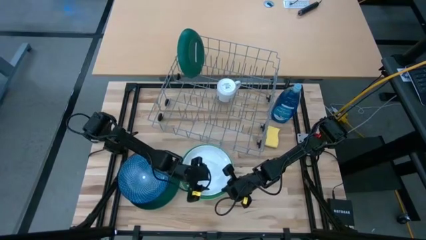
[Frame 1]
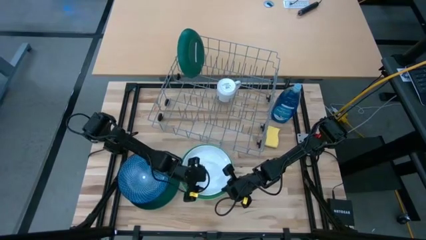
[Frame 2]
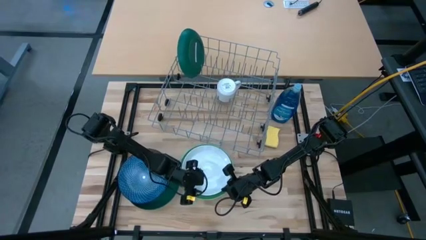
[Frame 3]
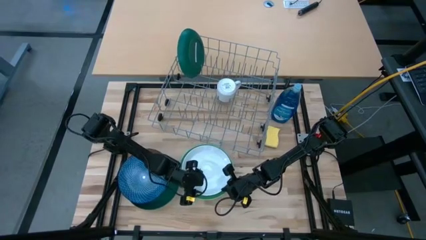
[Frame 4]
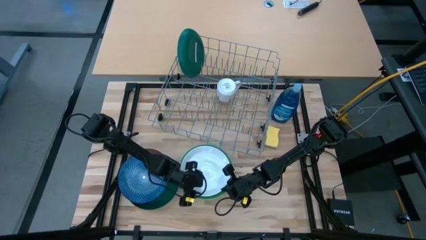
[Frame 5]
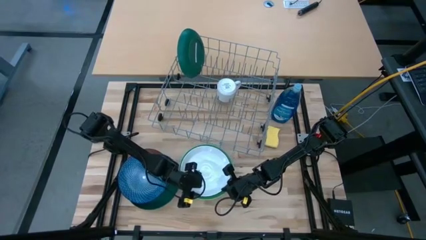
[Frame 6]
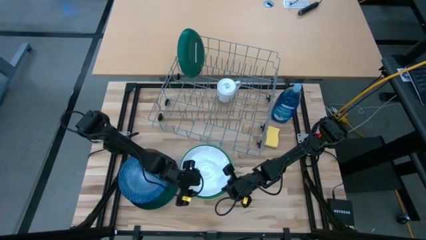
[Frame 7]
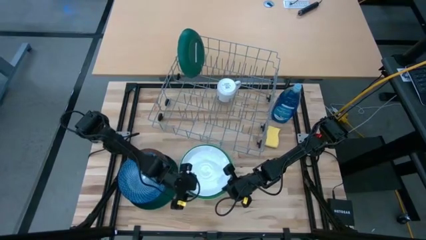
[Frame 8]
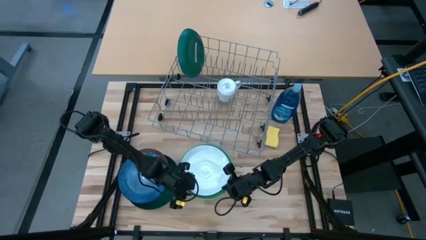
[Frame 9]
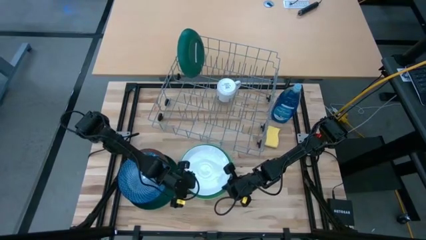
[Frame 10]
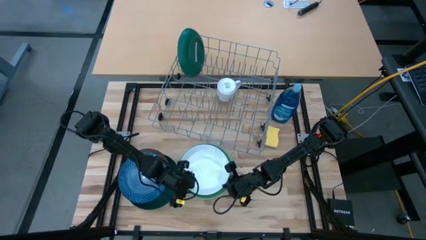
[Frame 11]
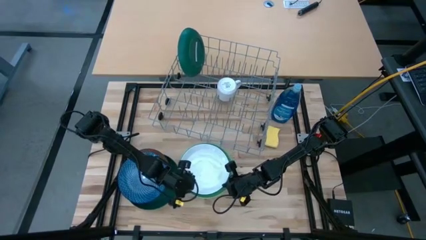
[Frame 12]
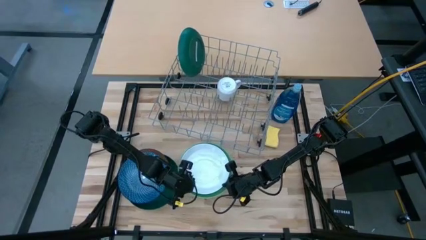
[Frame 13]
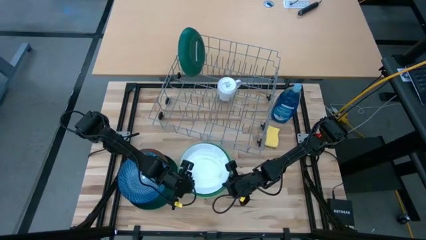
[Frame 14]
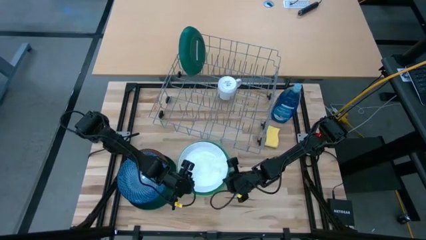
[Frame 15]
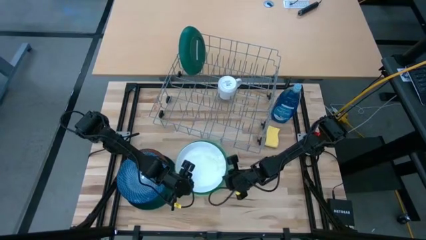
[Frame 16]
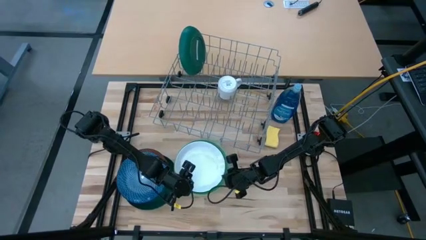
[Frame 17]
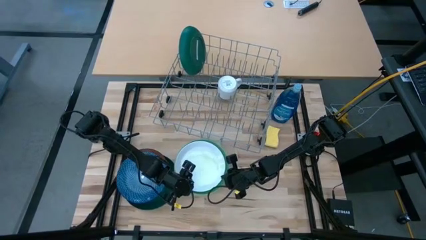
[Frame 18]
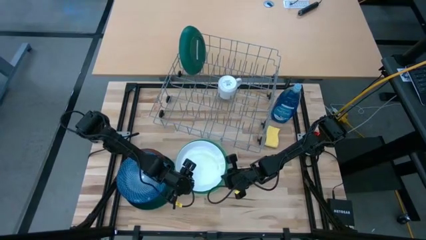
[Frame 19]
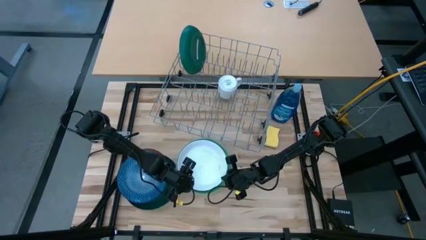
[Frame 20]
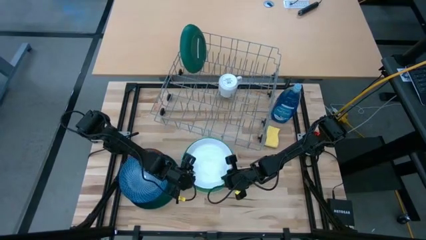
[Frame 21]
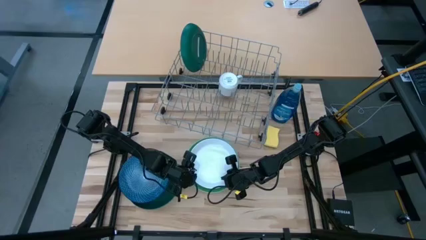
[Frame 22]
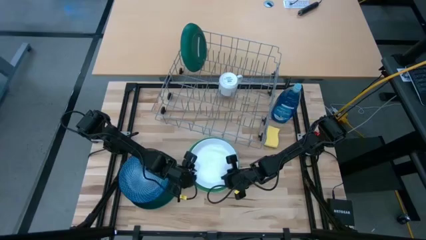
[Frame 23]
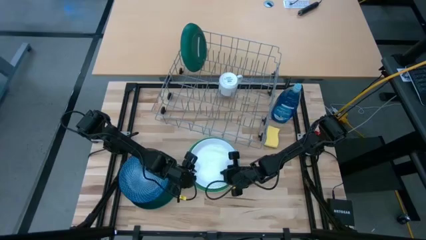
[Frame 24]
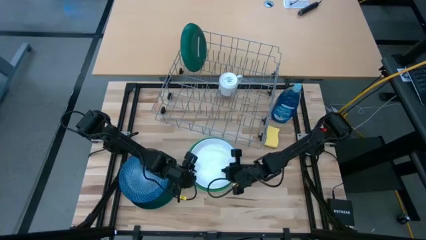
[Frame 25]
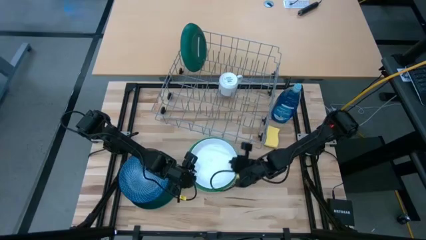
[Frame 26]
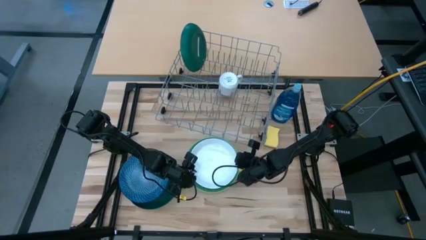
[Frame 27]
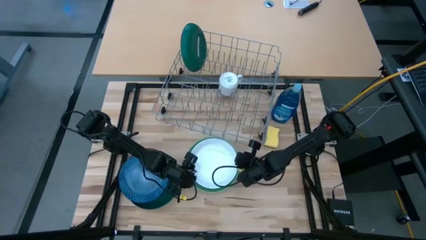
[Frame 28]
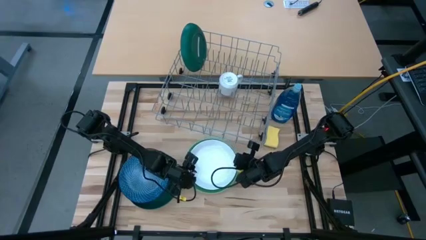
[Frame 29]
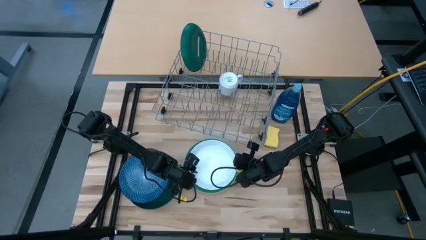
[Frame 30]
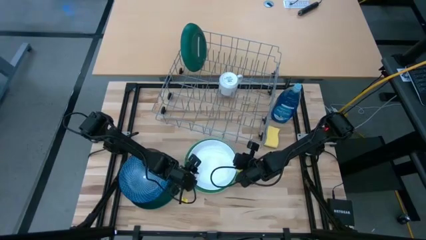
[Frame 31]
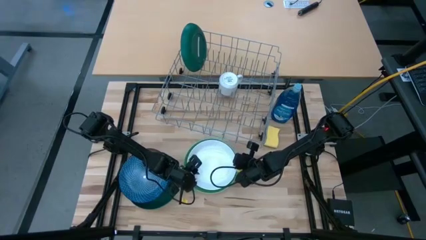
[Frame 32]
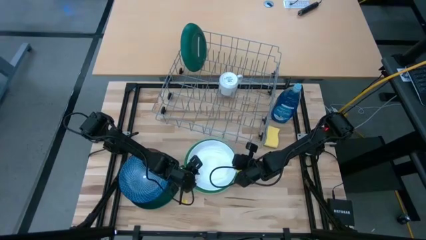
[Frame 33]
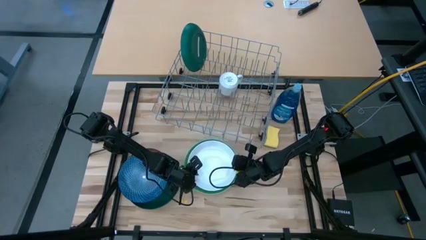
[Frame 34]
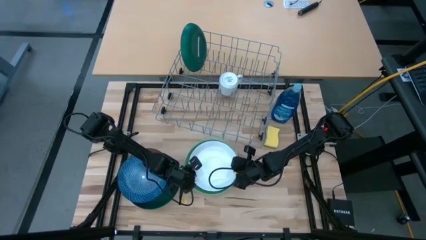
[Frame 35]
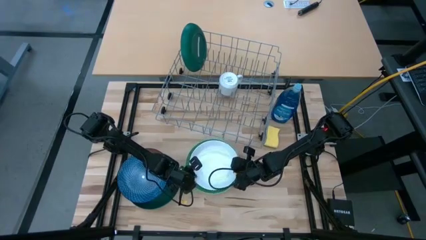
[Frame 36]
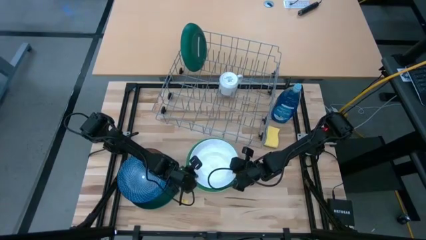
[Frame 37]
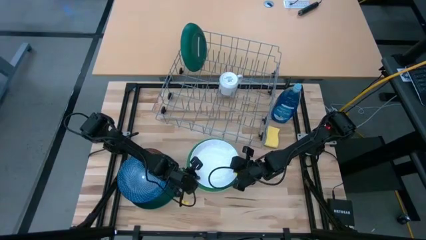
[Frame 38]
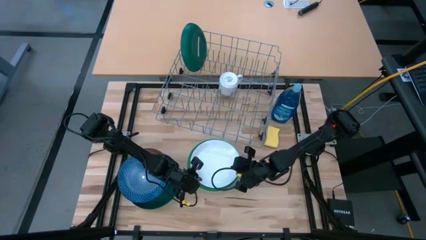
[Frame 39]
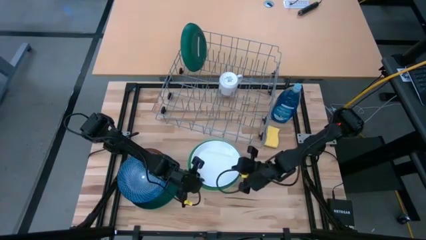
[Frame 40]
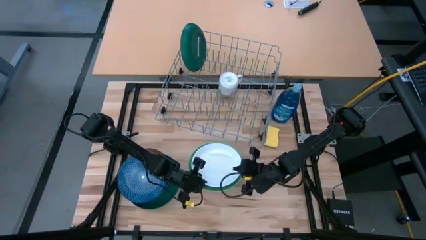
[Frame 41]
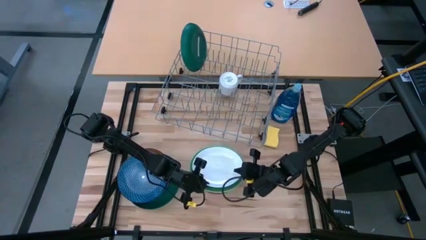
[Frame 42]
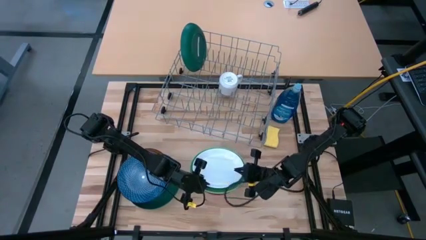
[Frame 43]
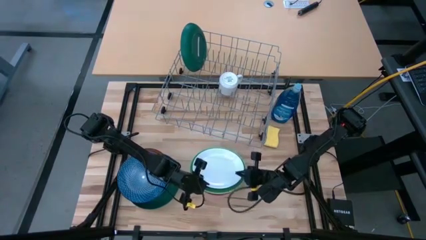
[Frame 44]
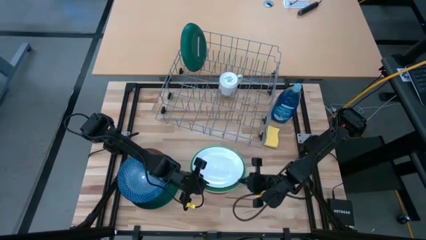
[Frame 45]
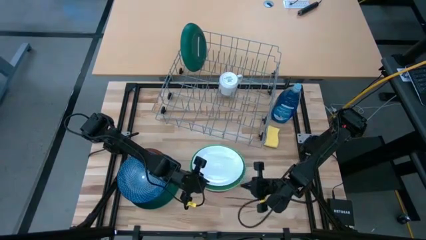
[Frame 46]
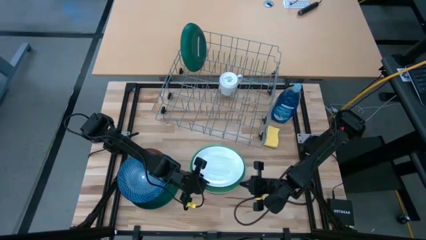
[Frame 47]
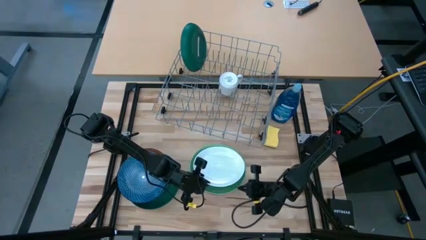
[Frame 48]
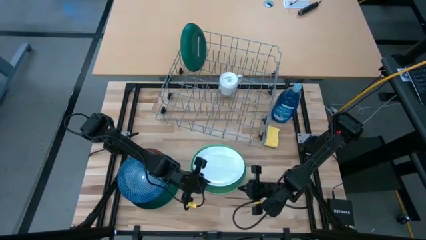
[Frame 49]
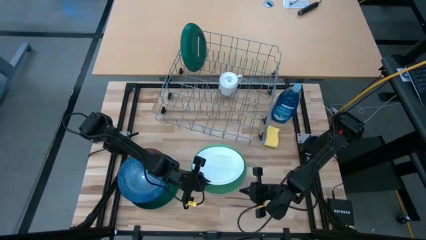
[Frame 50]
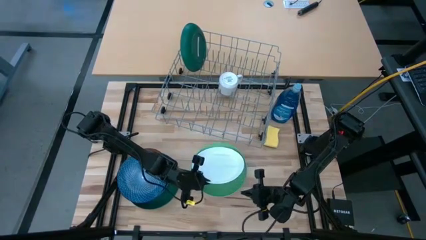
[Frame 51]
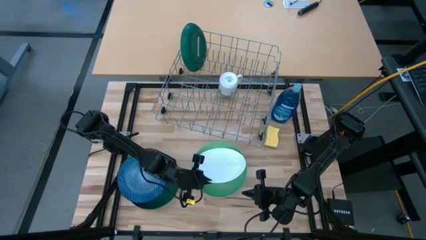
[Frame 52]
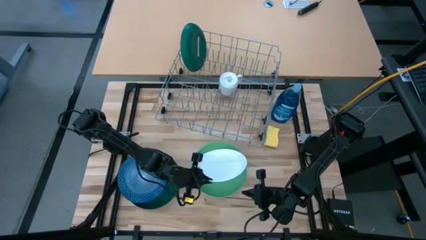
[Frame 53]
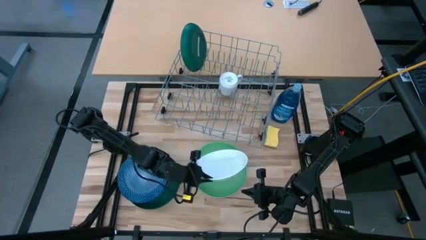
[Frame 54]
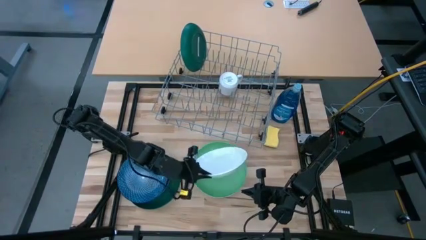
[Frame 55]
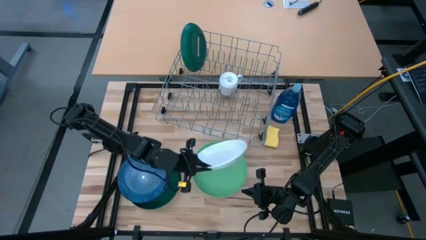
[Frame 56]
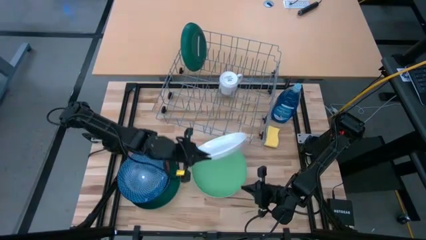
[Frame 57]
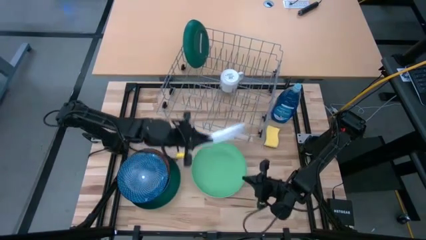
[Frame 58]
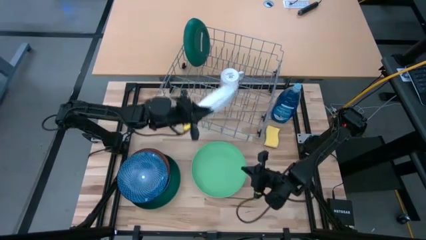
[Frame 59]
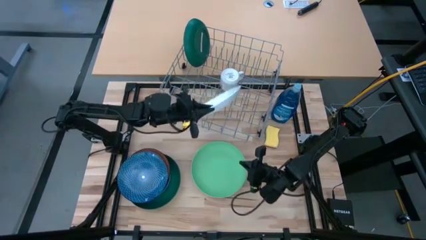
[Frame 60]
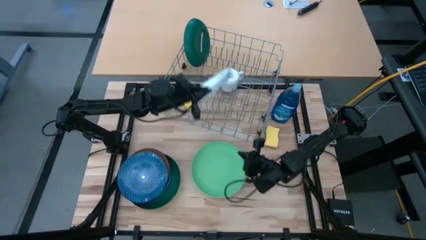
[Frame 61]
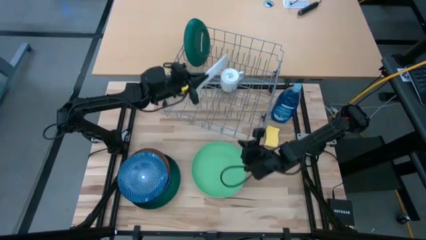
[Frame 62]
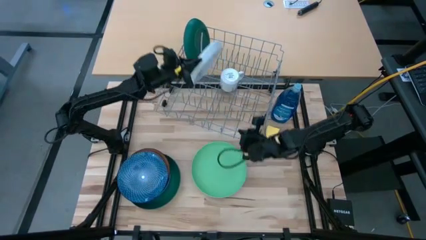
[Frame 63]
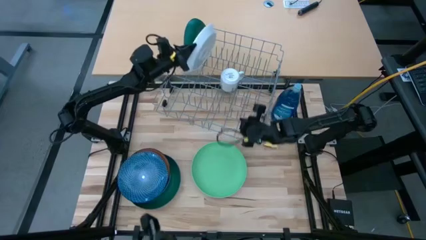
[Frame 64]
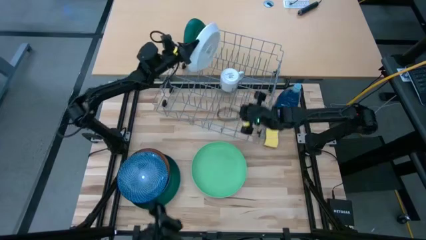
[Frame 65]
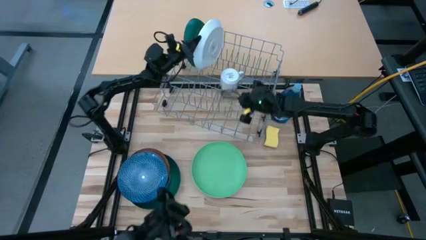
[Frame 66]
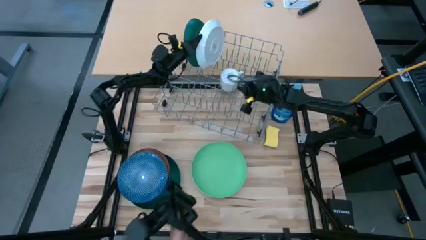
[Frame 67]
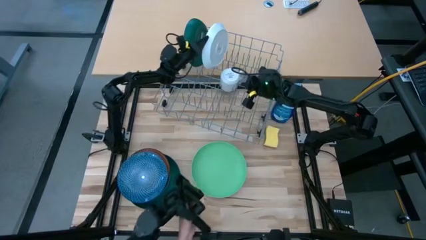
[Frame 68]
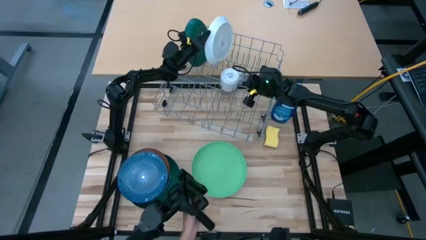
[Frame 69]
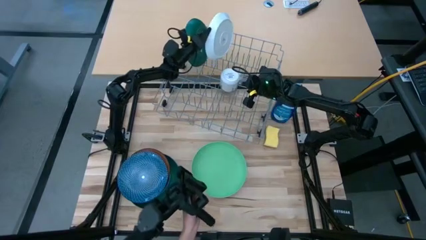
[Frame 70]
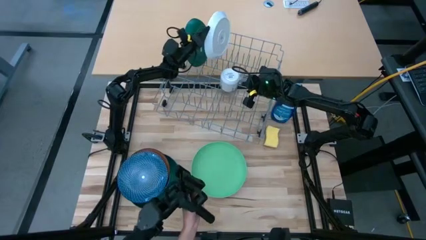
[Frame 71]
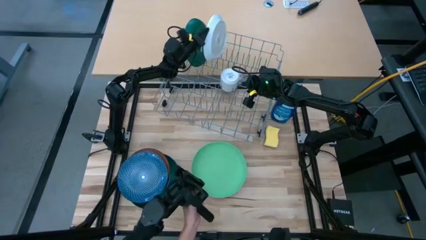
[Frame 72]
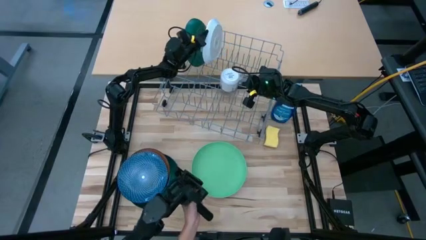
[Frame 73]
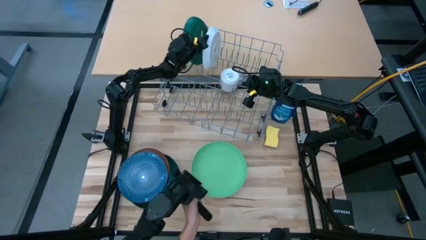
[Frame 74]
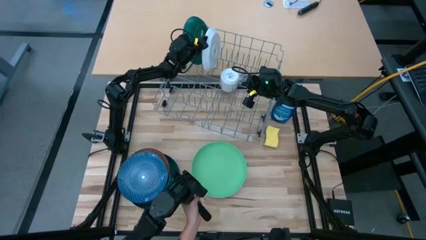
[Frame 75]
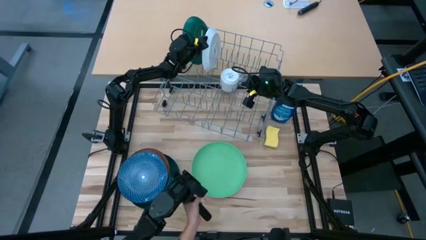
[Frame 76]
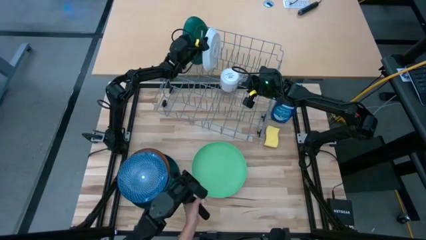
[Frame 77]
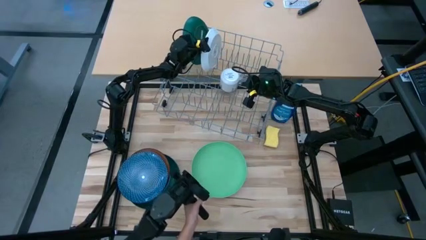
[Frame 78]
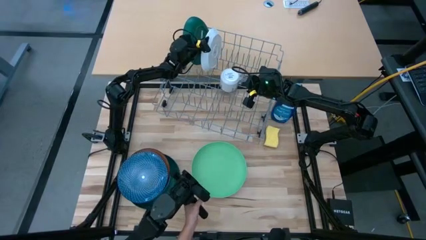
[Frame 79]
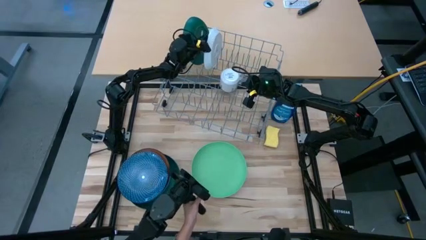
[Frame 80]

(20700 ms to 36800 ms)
Task: Sort dishes
Put the white plate in the dish rack
